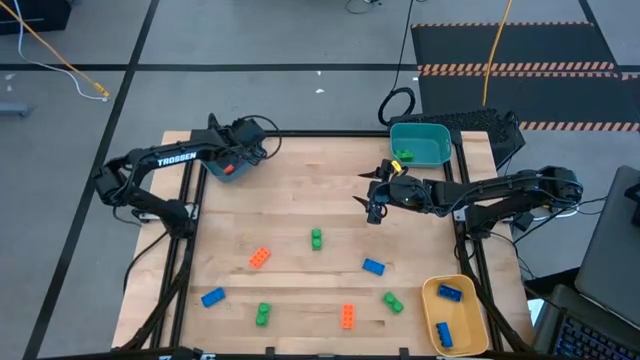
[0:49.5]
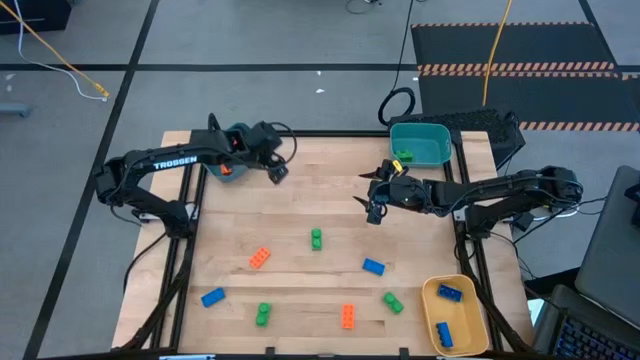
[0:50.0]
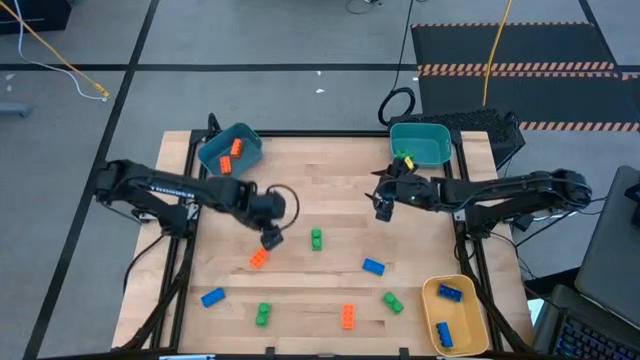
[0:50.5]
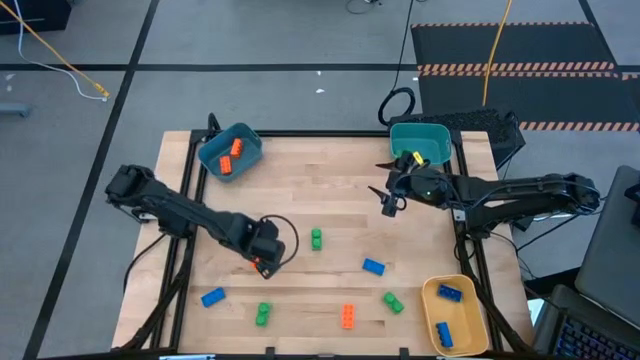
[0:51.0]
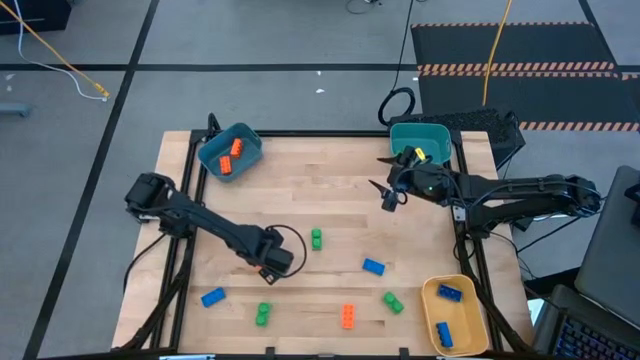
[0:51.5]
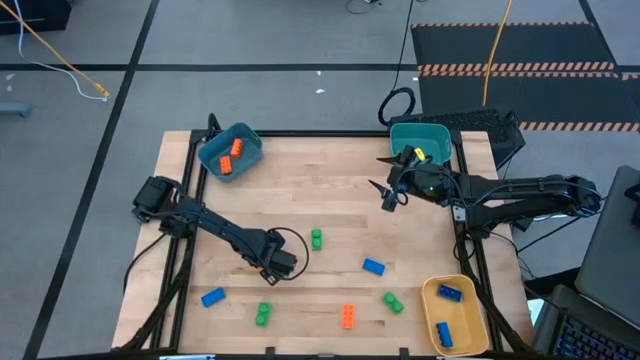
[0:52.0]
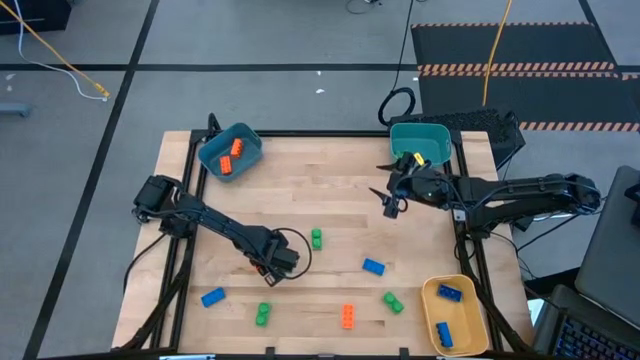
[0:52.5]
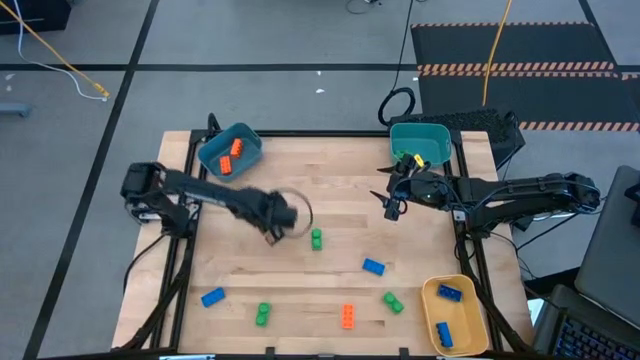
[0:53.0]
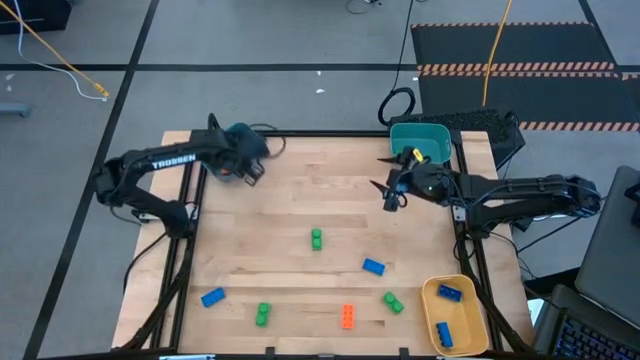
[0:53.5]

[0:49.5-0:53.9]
Task: Sort & place blocks by color
Put the top orange game piece into the dark blue bin

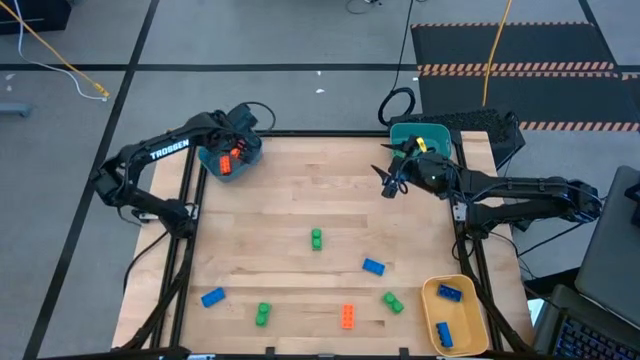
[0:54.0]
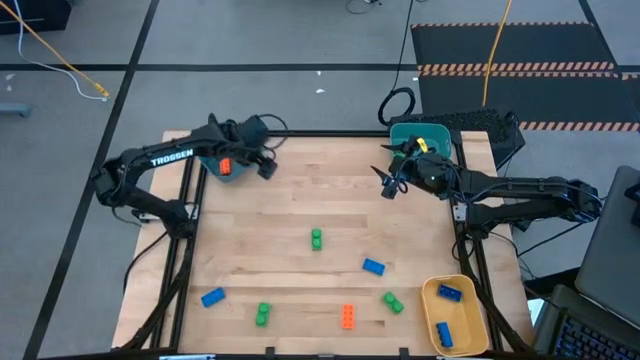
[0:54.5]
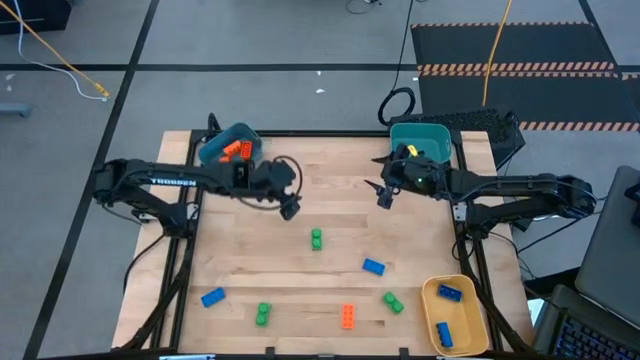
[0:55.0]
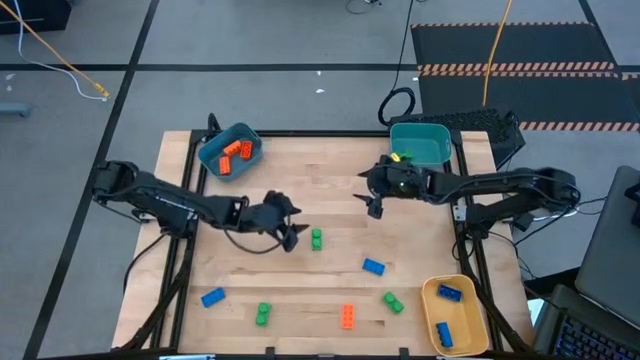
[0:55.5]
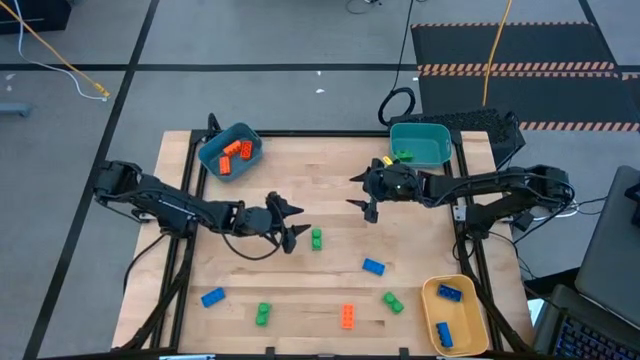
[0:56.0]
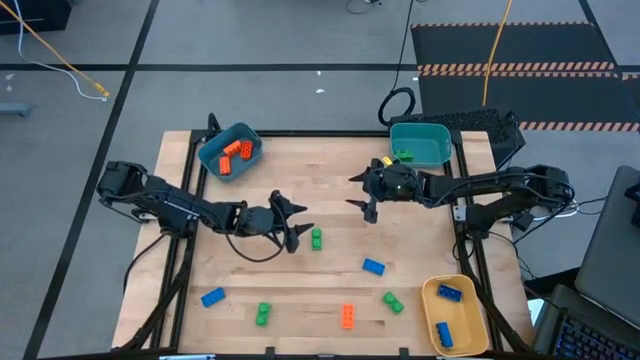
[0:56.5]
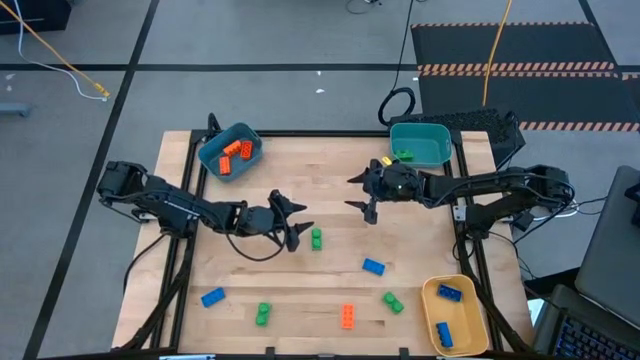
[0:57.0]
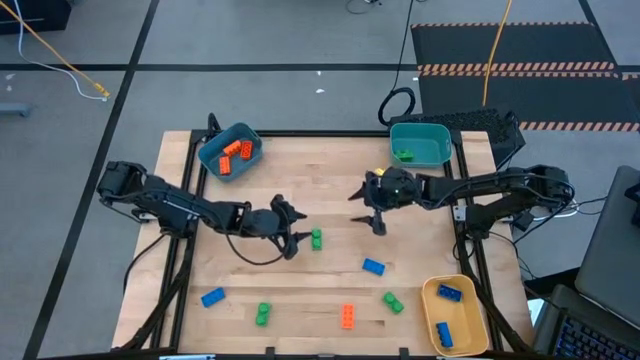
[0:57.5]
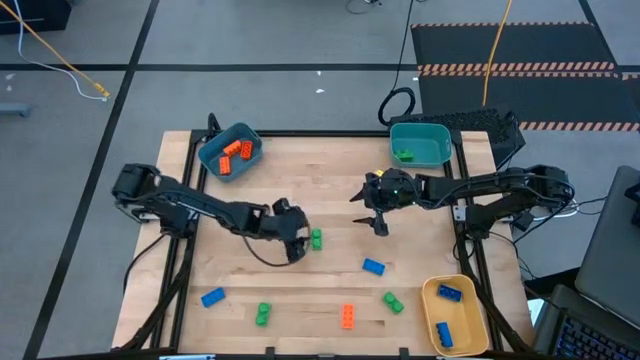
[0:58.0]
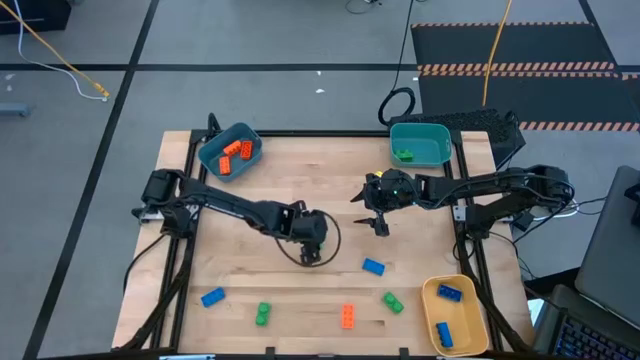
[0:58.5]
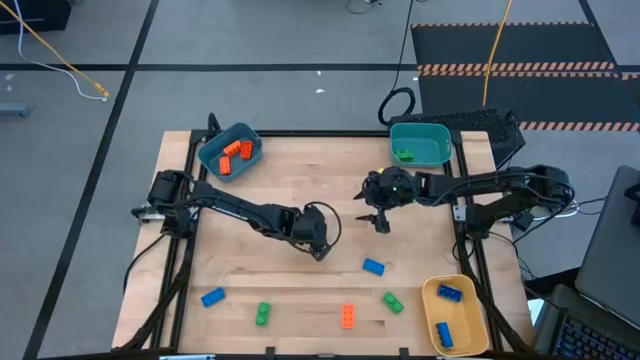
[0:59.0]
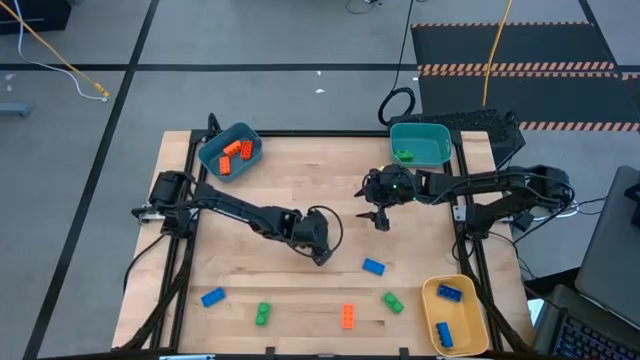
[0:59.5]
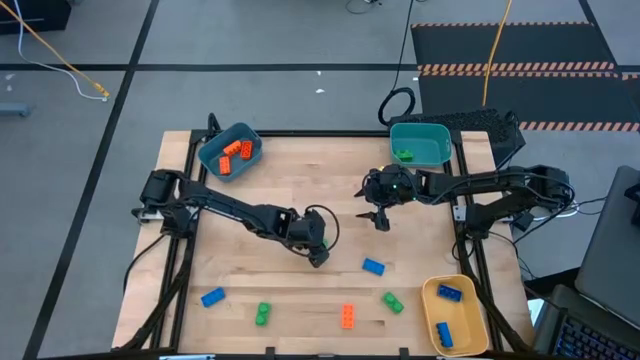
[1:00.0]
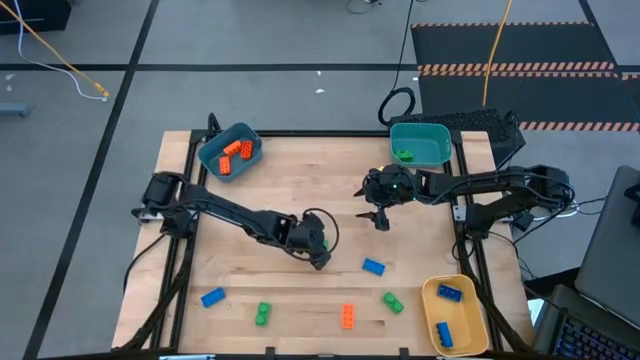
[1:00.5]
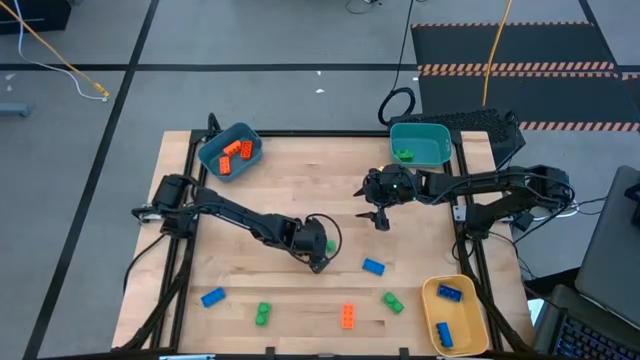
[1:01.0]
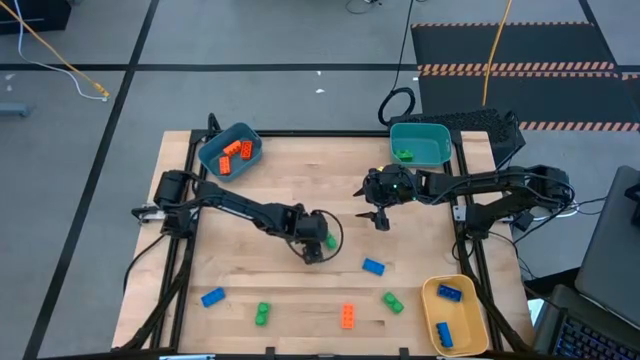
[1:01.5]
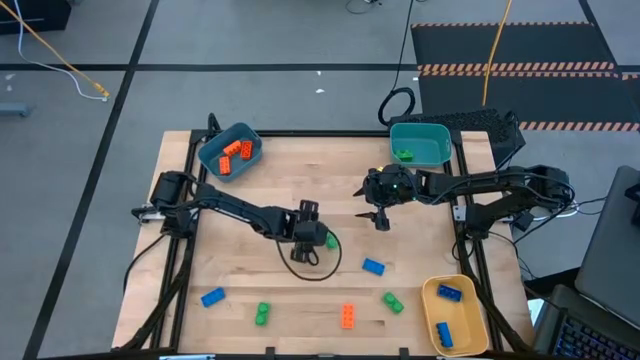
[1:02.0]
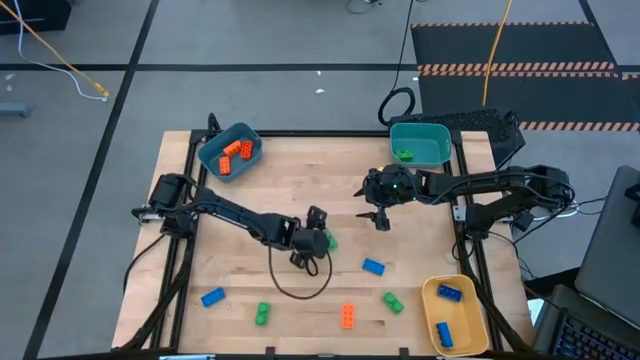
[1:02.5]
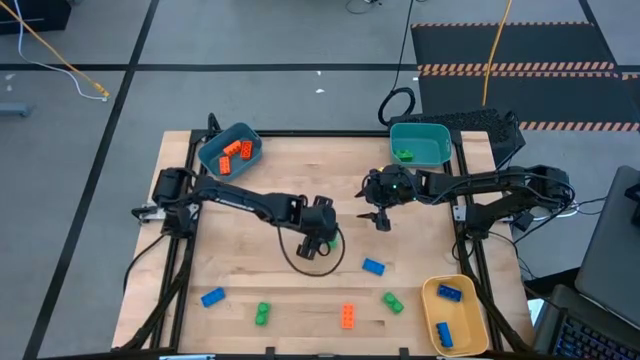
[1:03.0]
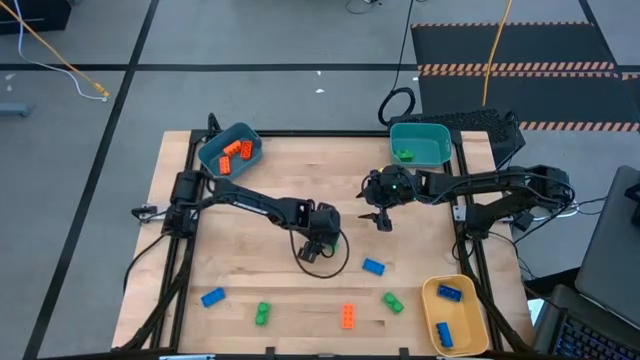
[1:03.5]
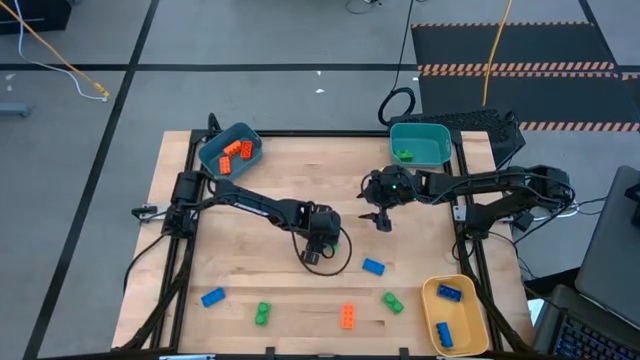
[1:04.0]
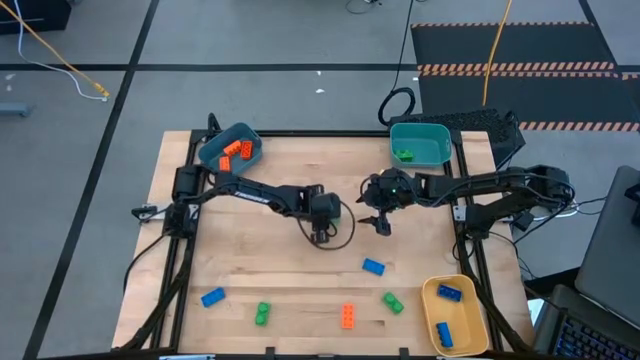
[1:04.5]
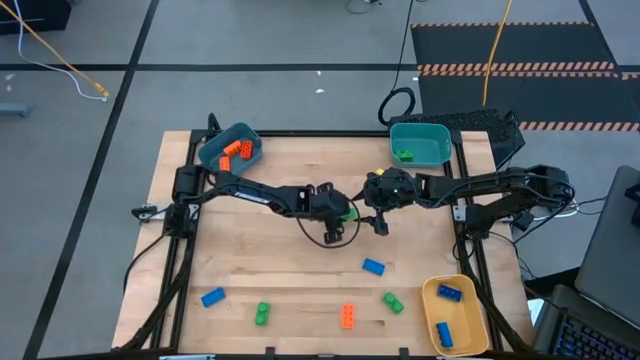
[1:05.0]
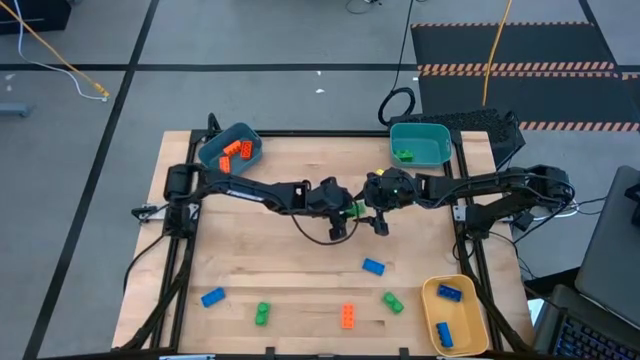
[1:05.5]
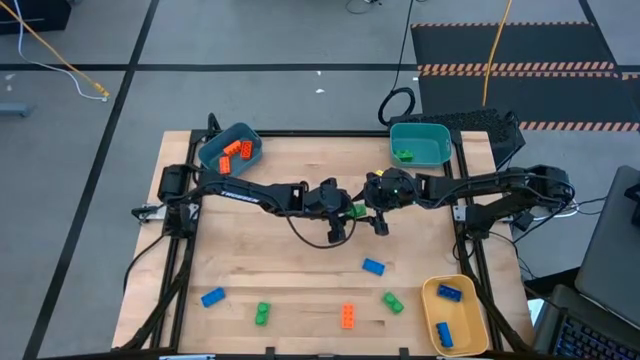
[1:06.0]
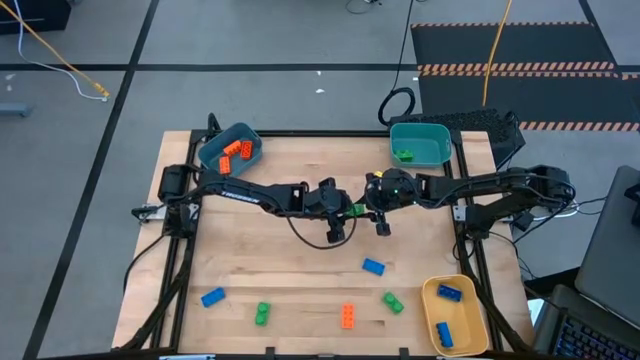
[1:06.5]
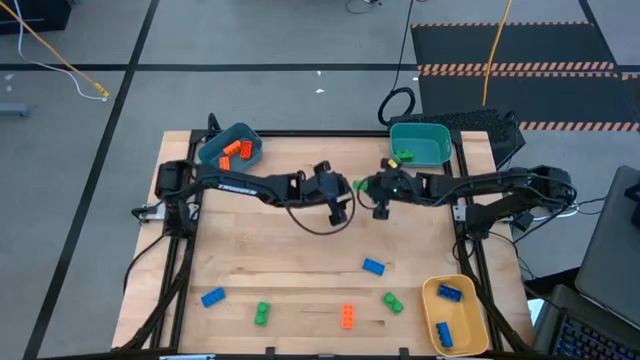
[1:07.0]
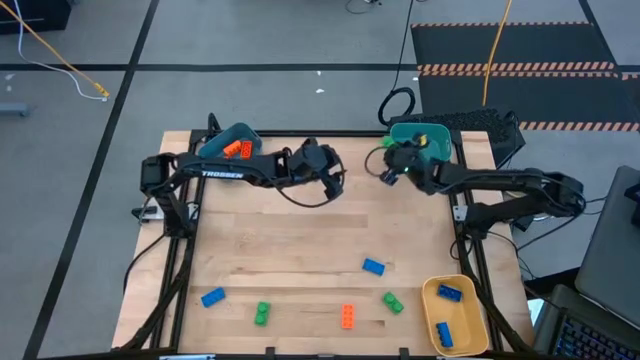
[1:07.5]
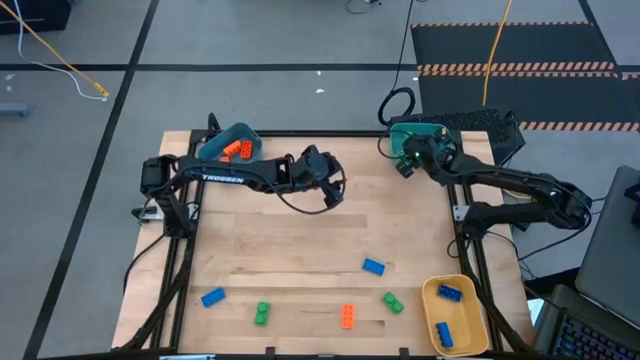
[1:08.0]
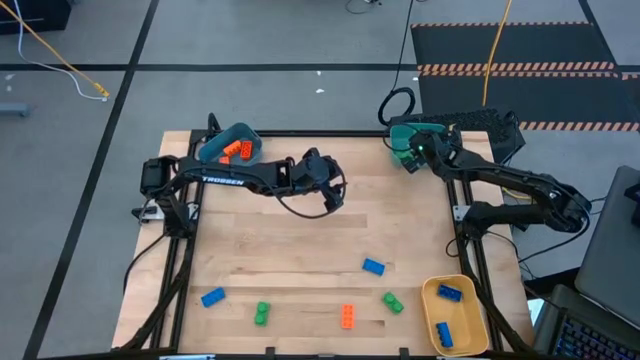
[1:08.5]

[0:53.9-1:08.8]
Put the top green game piece into the light blue bin
